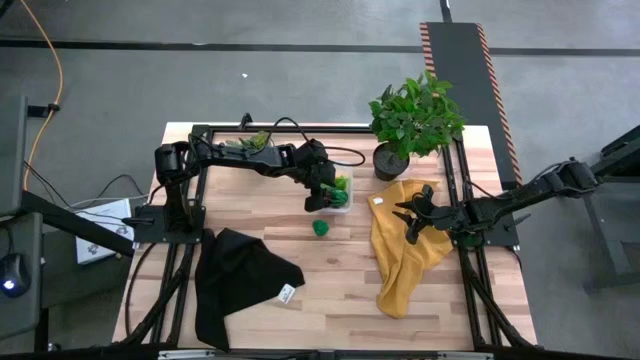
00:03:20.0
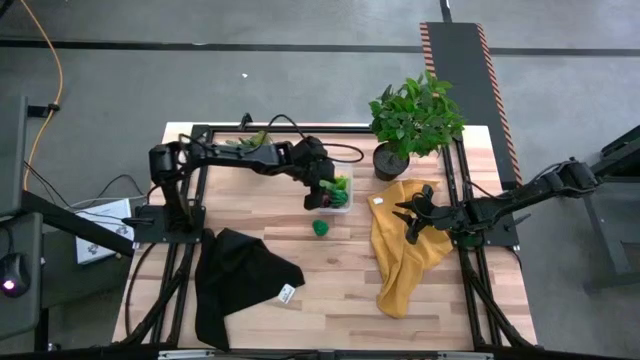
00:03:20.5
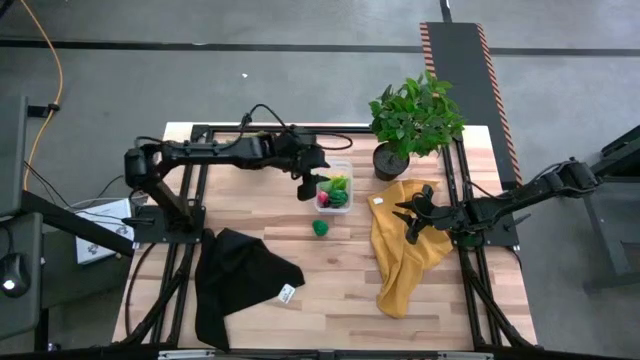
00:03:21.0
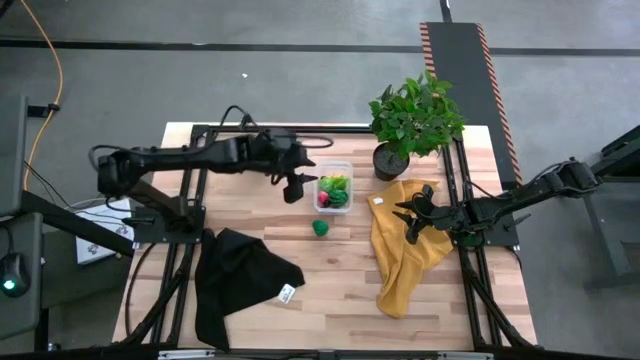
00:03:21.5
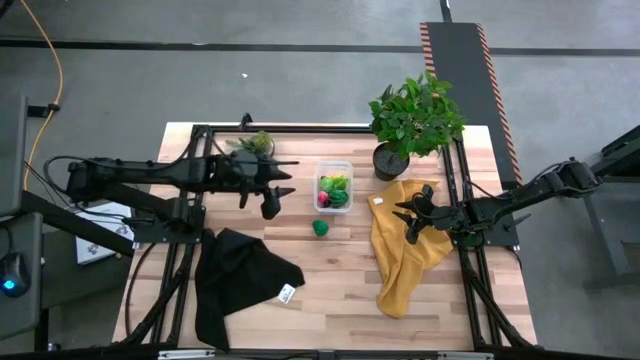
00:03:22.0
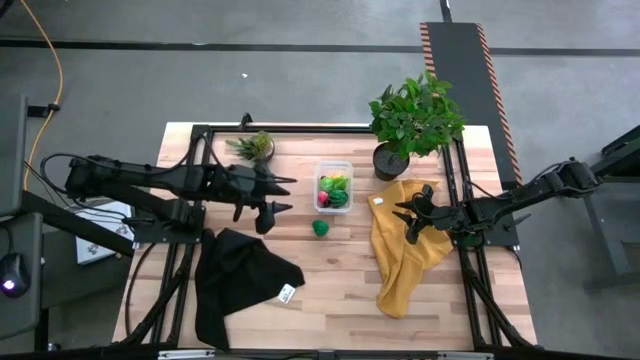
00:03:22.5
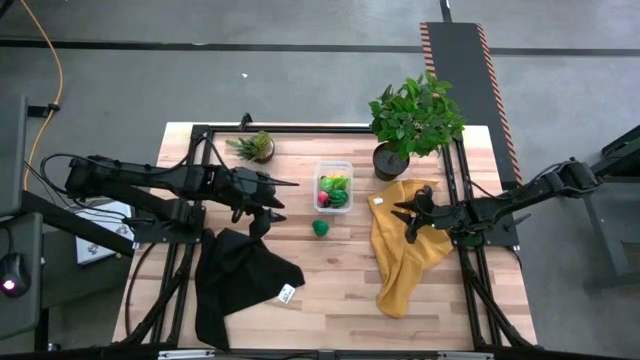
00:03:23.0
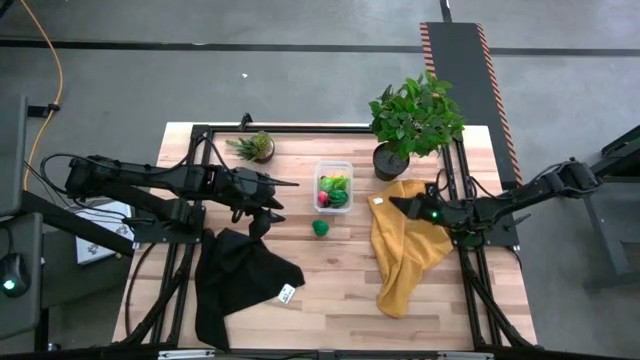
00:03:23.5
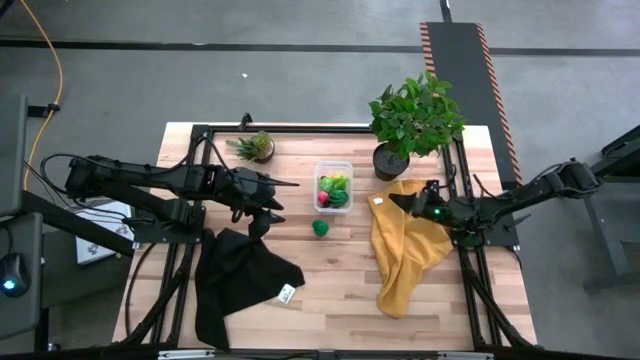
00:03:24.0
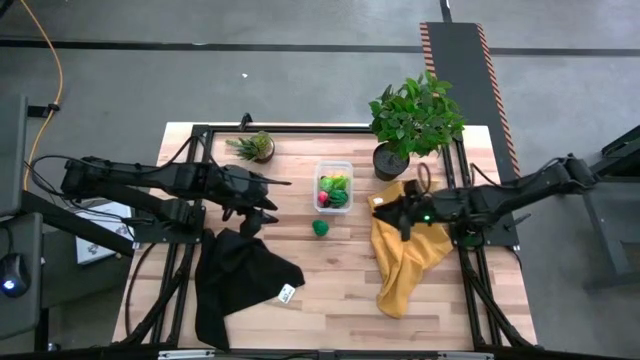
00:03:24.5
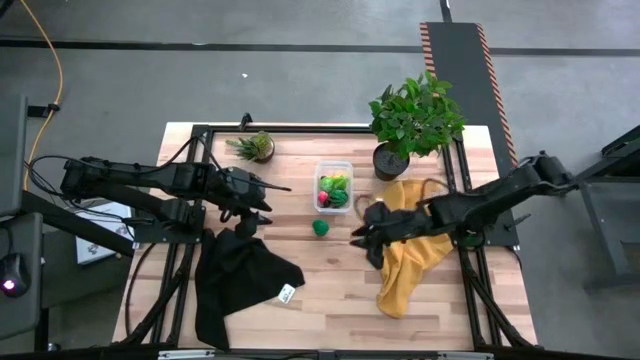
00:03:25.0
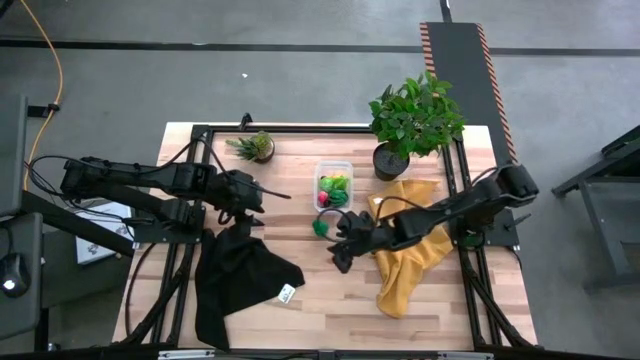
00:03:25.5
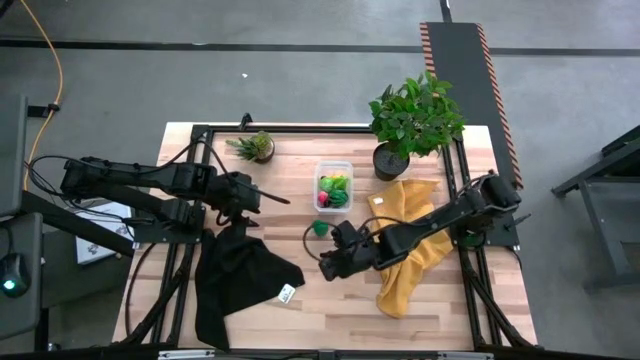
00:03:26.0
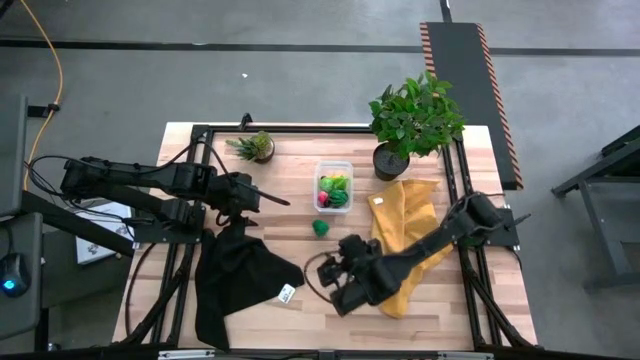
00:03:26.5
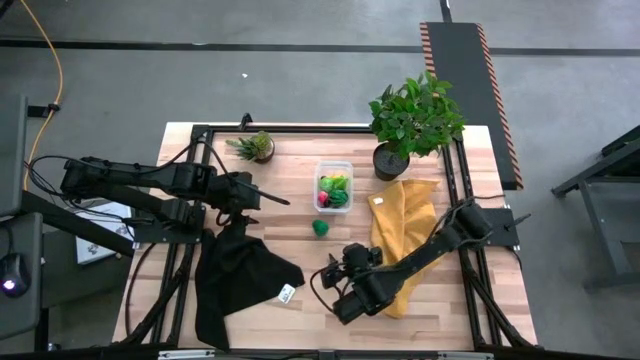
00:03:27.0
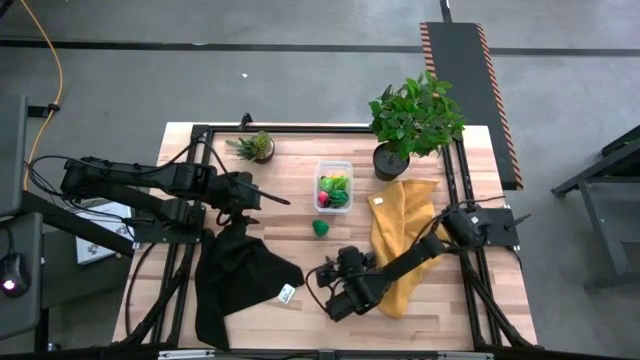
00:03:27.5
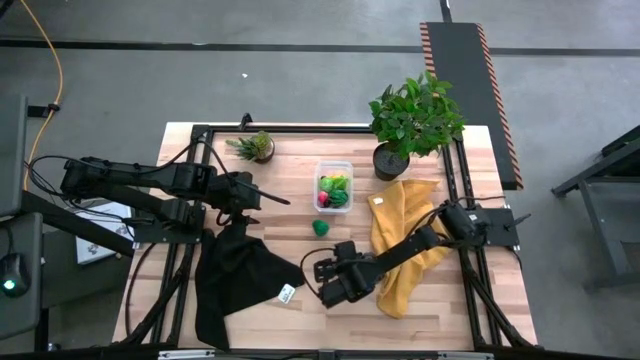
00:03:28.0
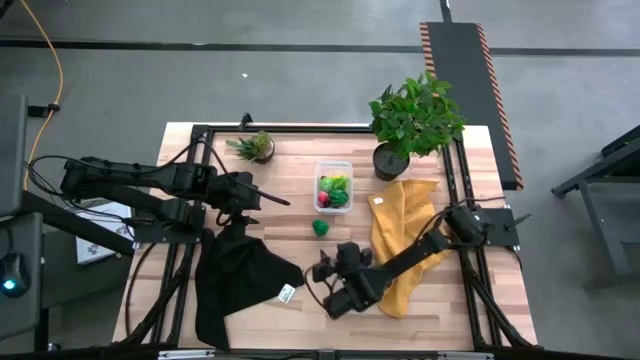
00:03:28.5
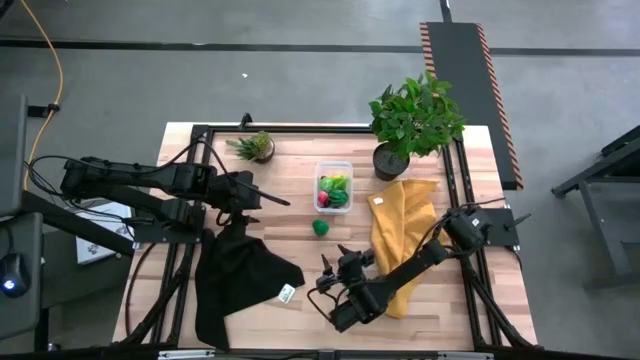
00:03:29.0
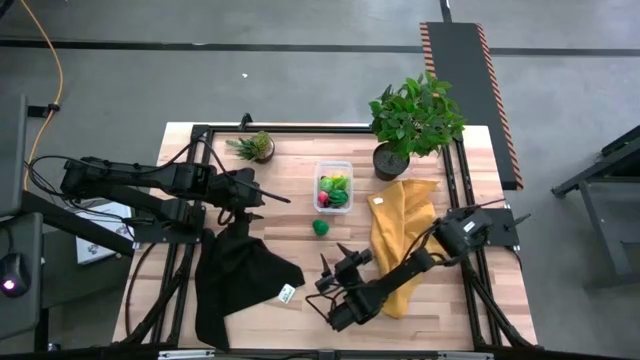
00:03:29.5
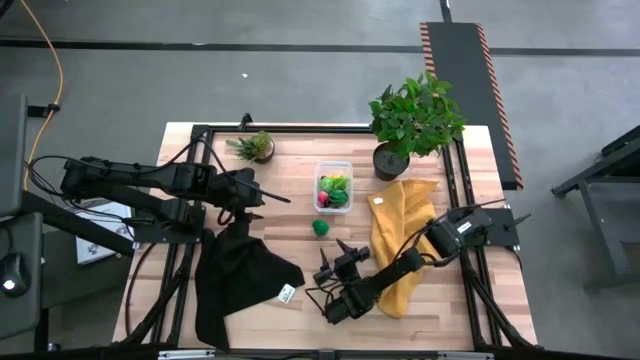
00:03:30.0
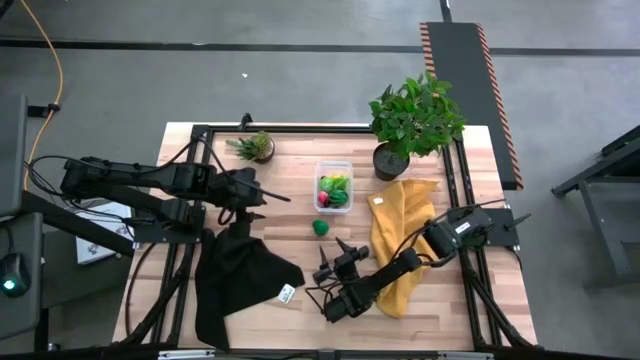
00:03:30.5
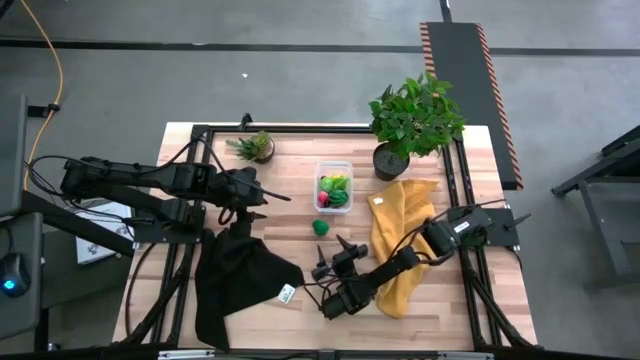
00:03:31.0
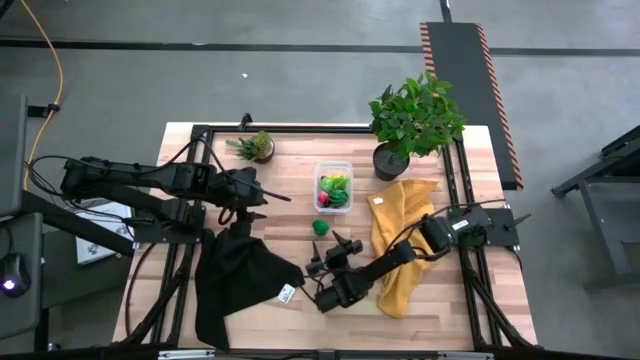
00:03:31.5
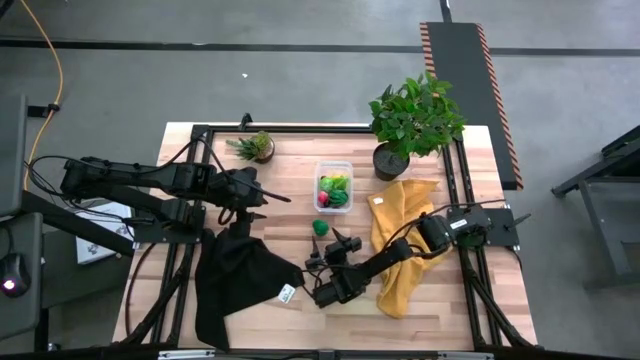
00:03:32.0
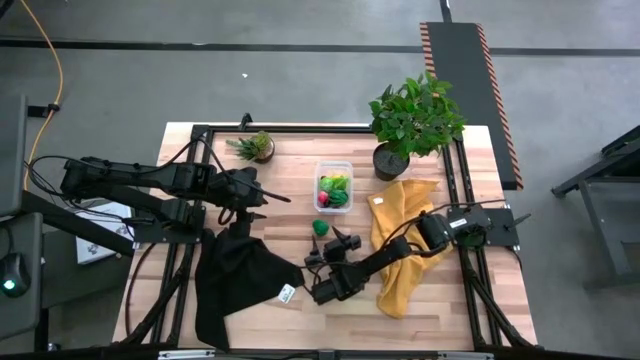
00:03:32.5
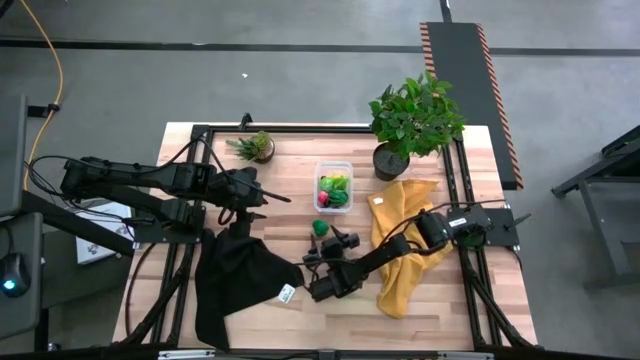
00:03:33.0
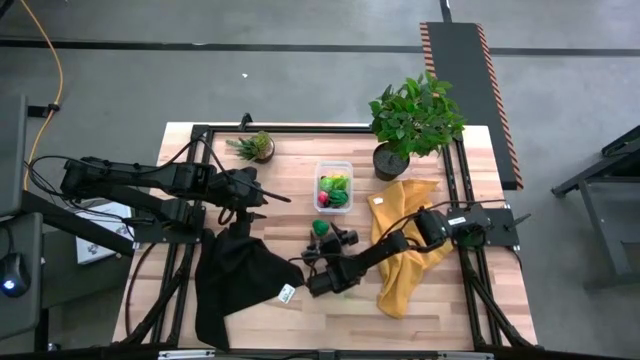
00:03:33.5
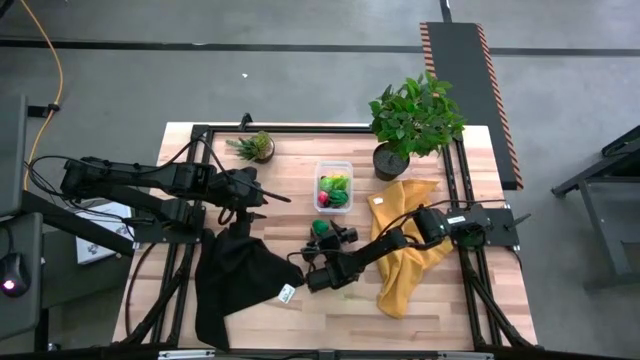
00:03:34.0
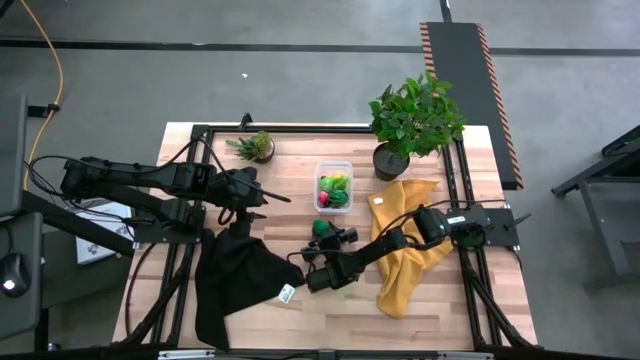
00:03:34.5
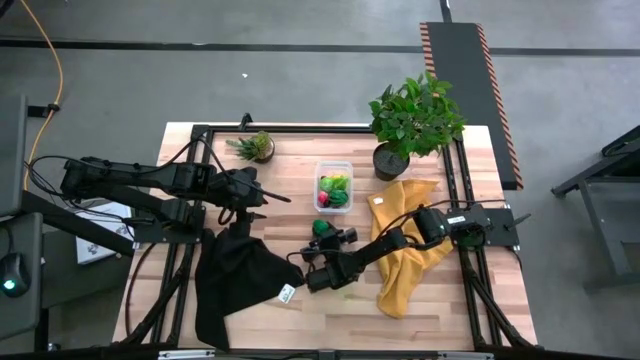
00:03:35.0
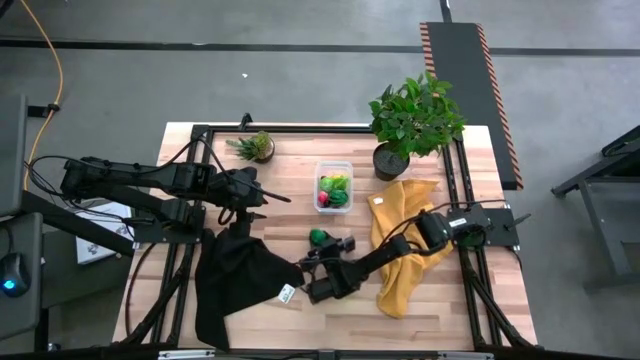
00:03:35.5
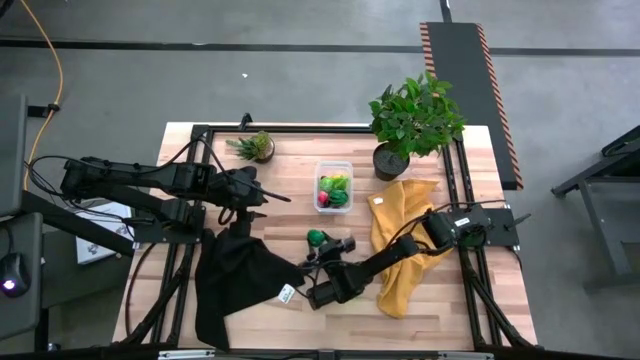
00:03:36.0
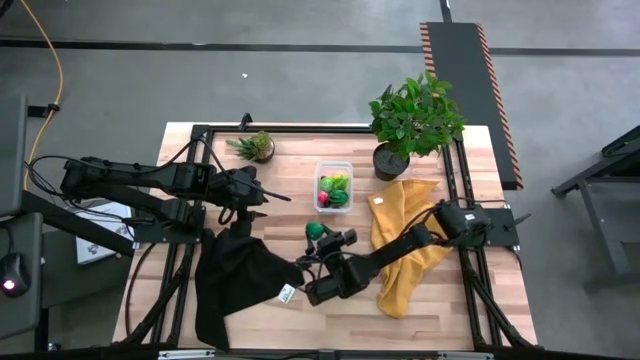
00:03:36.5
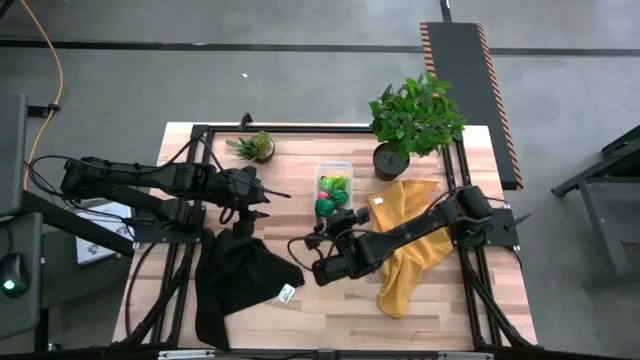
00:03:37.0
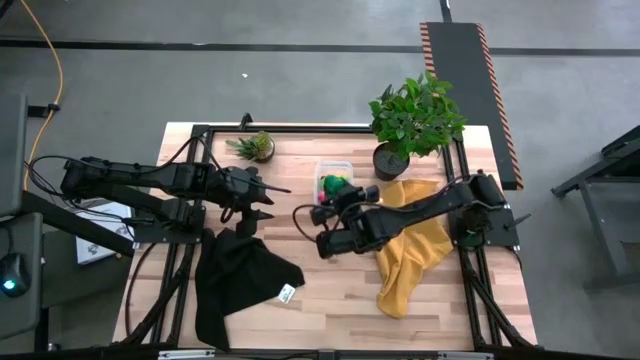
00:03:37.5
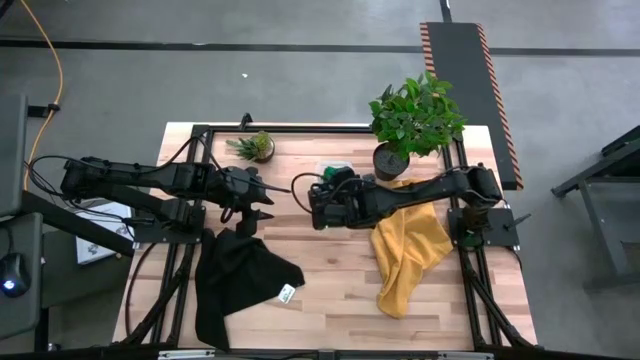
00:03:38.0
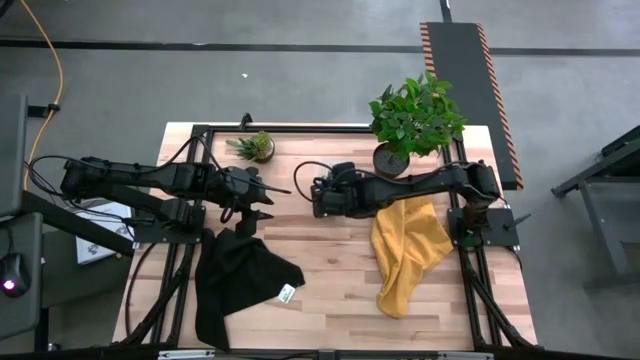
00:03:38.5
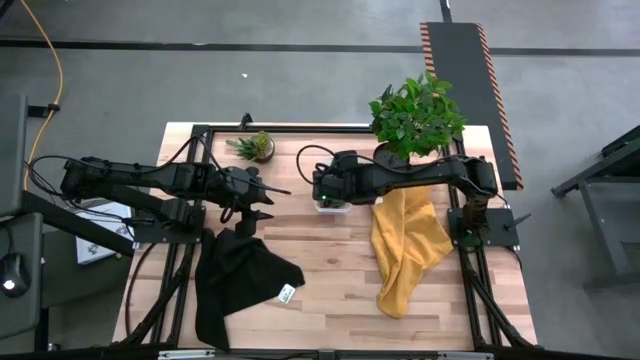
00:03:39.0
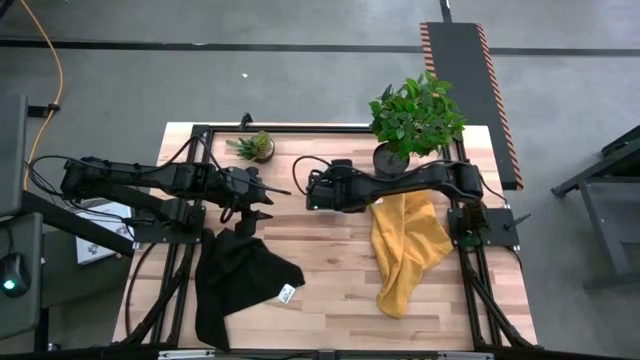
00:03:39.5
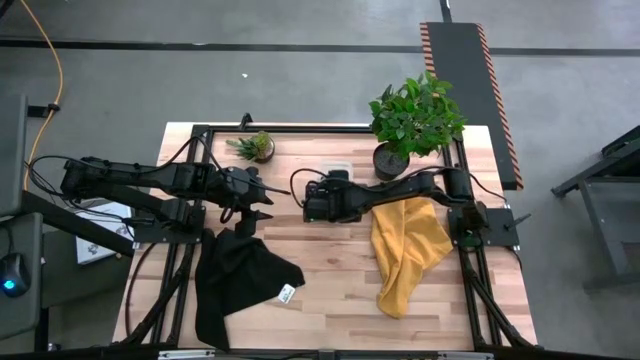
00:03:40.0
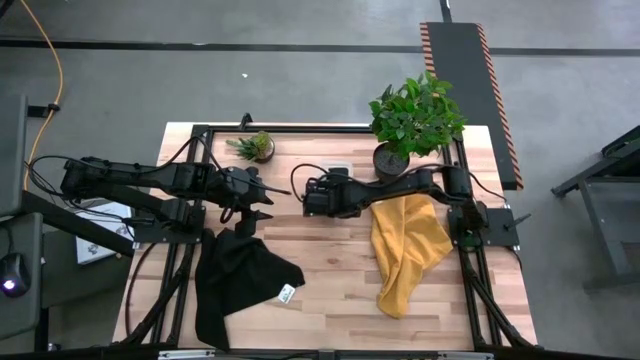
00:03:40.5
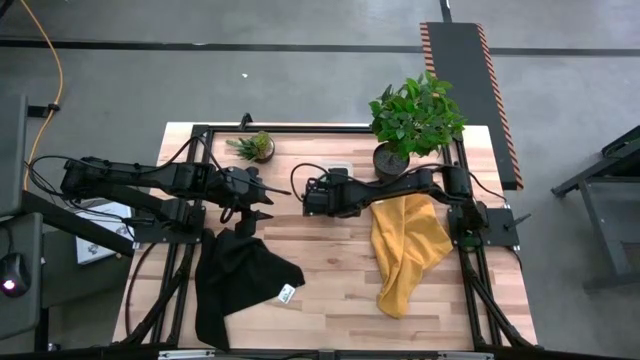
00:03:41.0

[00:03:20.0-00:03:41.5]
Task: Pick and placing Produce into tupperware
Put the bell pepper into the transparent bin
